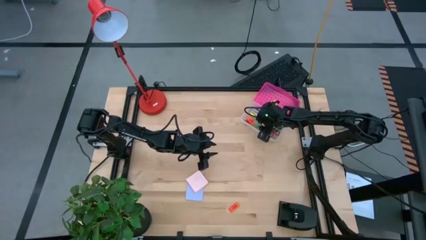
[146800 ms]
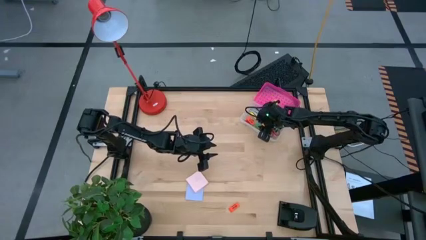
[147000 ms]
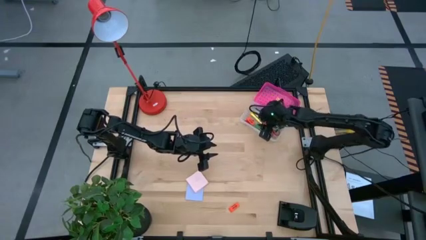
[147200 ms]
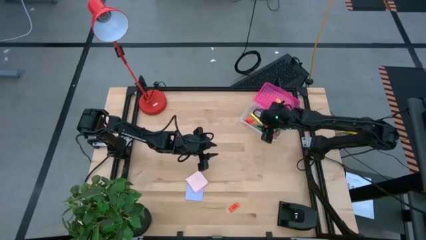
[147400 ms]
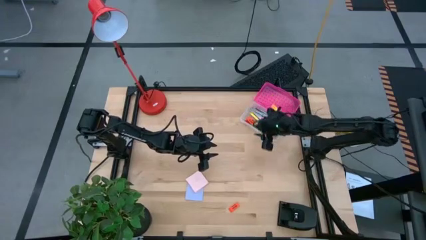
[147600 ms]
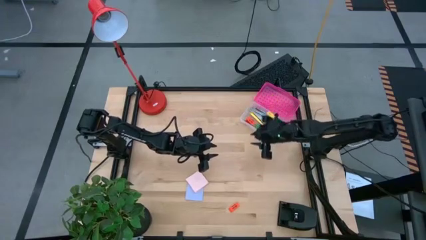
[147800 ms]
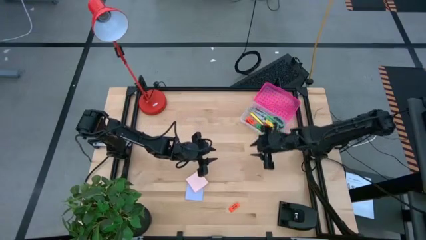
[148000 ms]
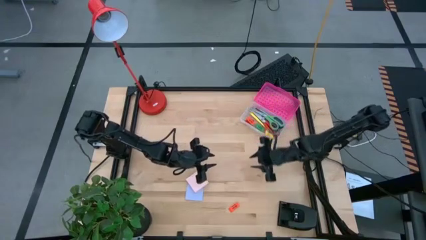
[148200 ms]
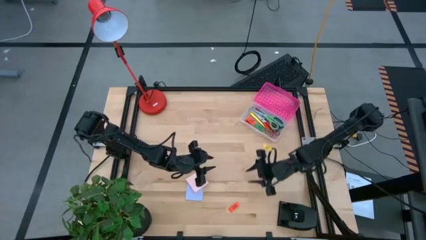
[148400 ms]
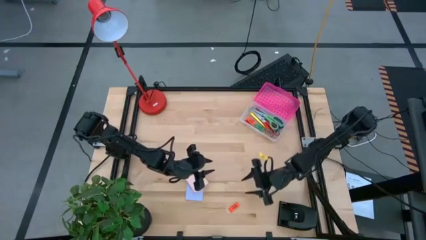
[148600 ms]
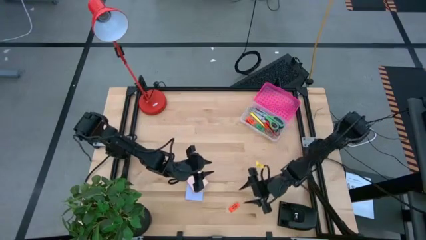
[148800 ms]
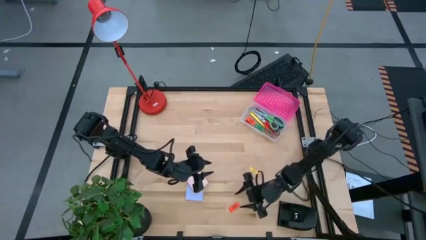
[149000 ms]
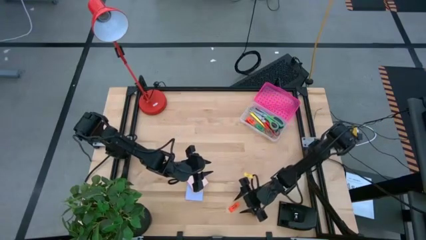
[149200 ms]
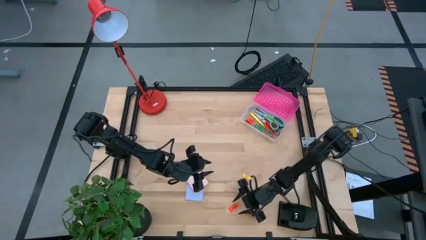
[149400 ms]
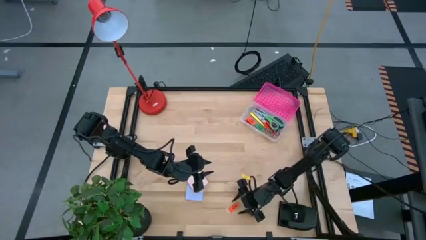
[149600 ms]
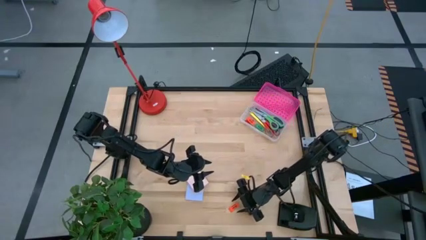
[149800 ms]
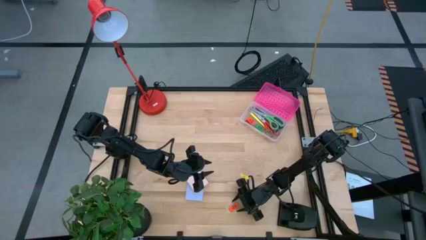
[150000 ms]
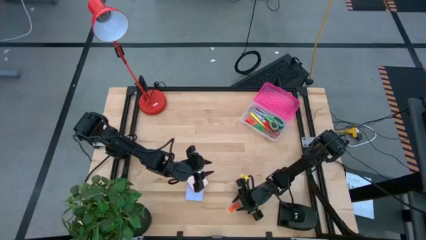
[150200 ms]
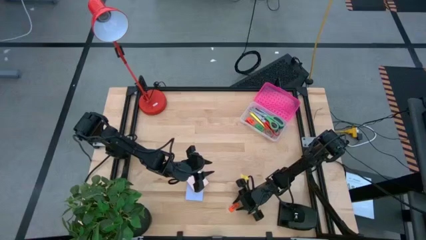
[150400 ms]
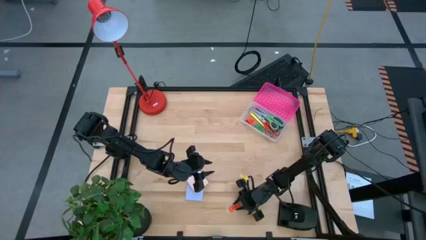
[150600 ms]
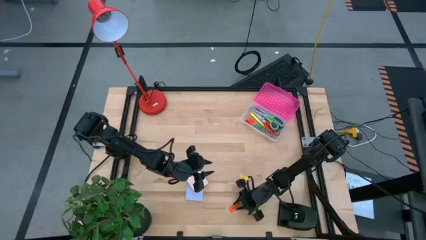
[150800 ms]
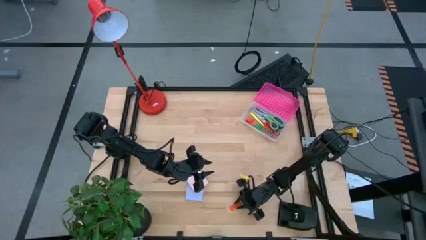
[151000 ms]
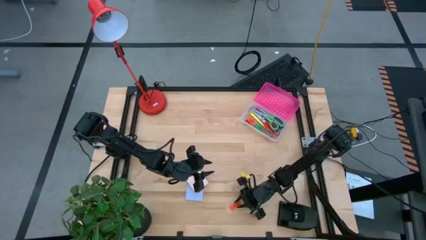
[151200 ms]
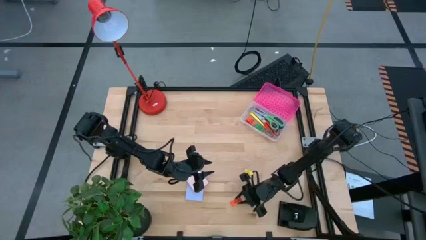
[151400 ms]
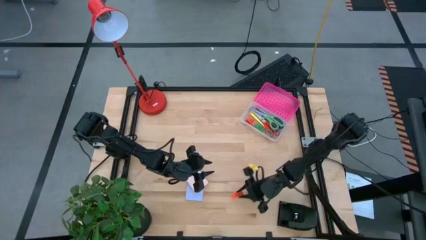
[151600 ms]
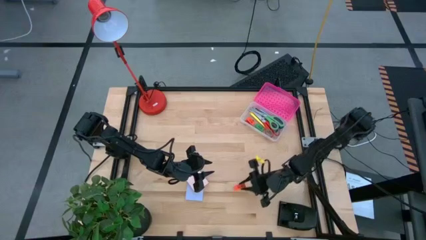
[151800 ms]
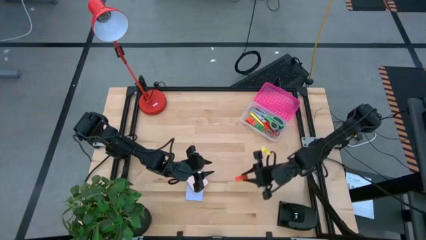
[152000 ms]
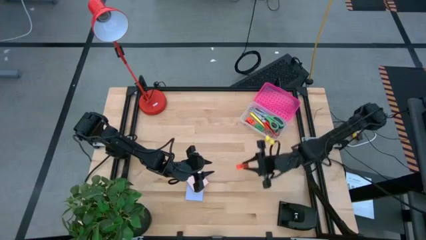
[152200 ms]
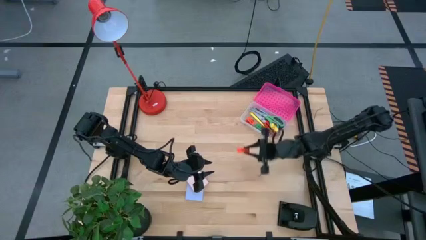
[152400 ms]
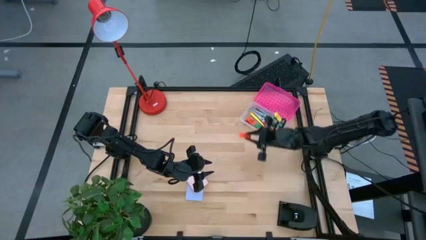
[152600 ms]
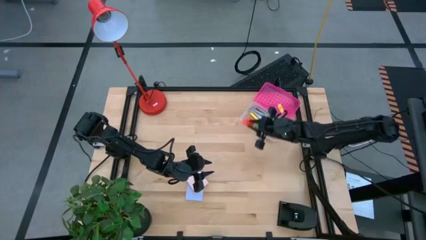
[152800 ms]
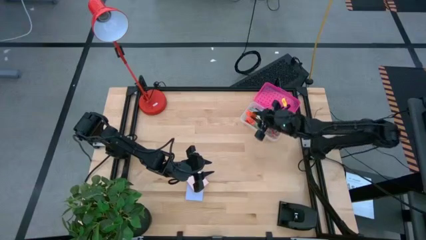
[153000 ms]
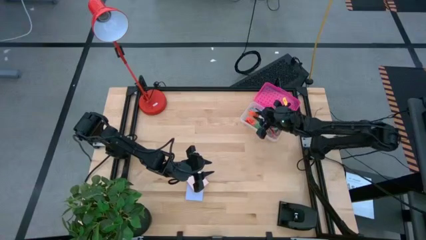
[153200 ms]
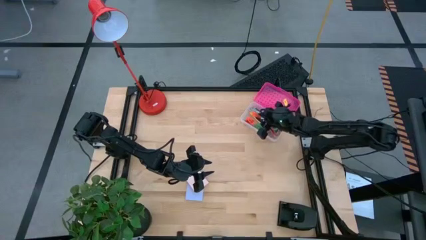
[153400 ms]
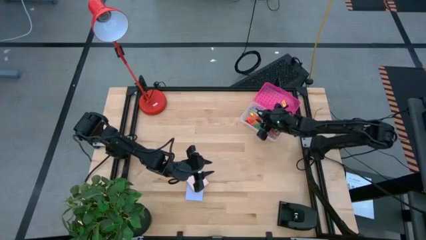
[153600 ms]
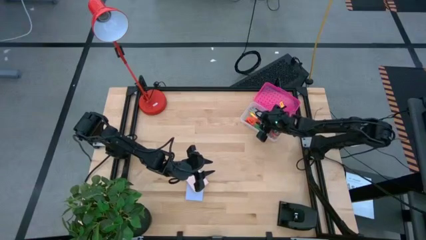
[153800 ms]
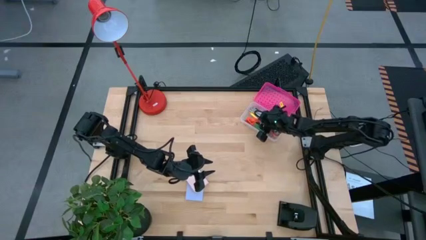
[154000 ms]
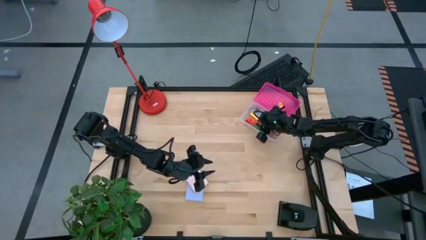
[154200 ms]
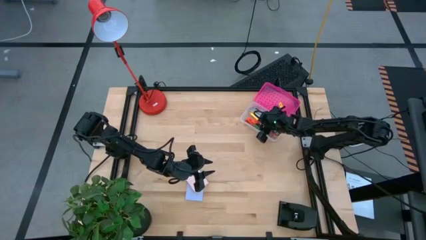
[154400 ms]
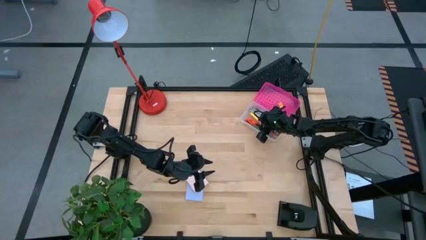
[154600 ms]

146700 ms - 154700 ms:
Task: Pack school essentials
Put the orange eraser into the supply box

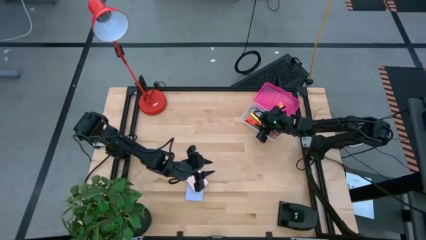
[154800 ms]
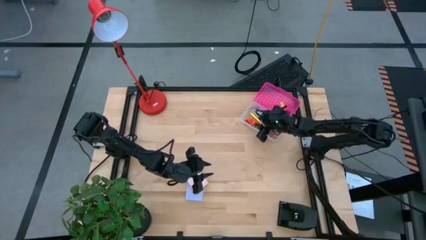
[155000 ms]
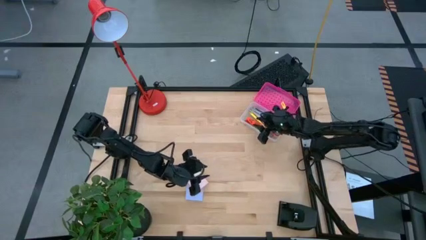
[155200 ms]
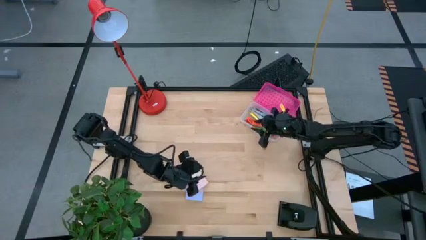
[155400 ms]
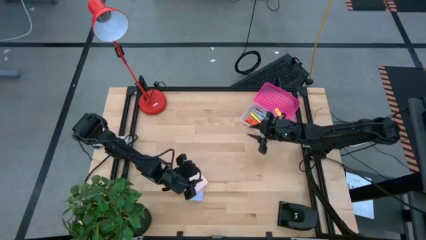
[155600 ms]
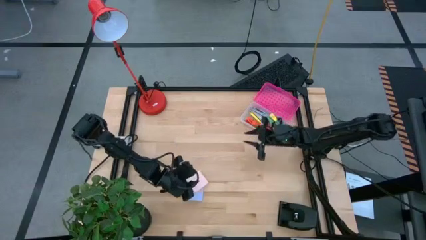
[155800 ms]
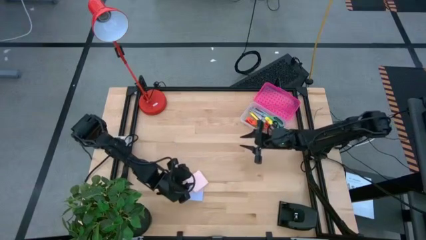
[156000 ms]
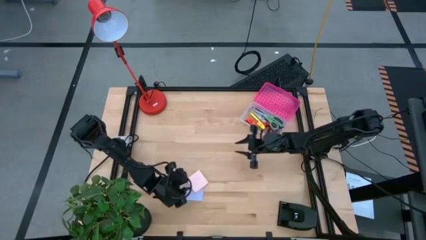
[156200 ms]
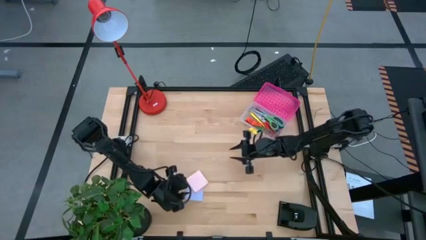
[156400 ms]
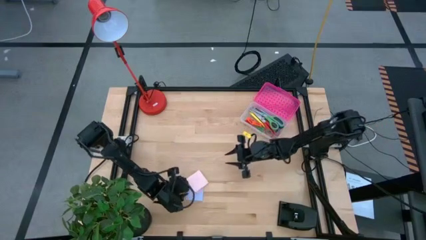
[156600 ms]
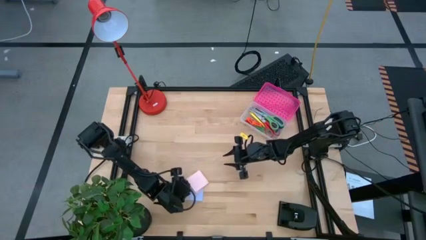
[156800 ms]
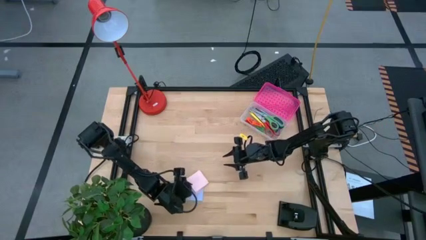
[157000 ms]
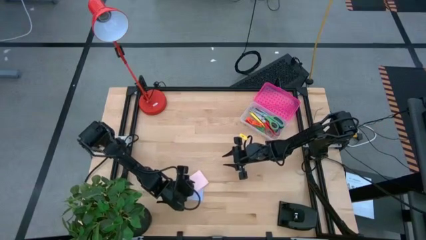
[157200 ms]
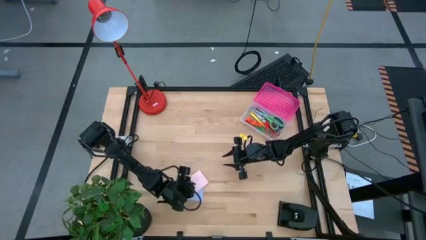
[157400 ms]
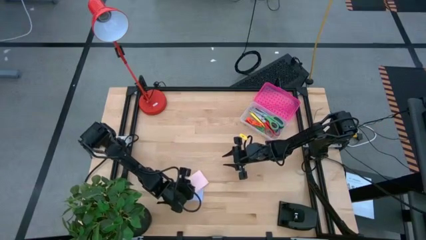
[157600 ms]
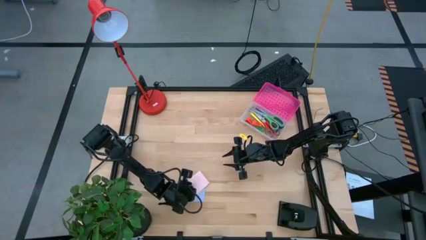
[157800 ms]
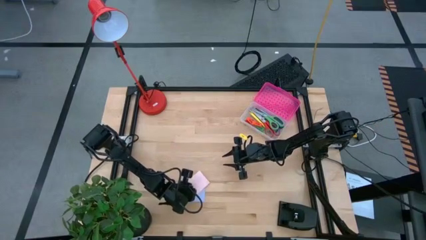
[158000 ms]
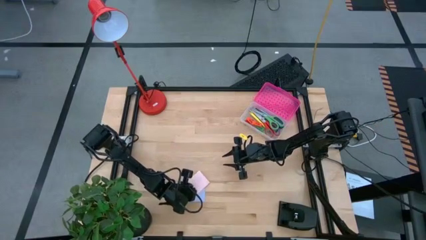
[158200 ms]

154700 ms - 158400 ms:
Put the pink sticky notes into the supply box
